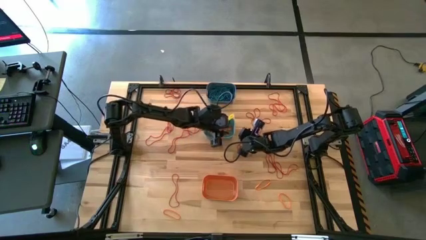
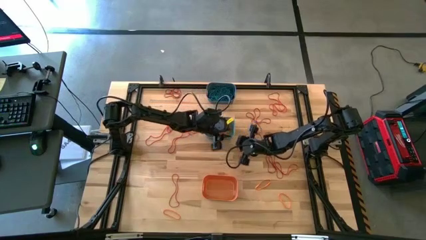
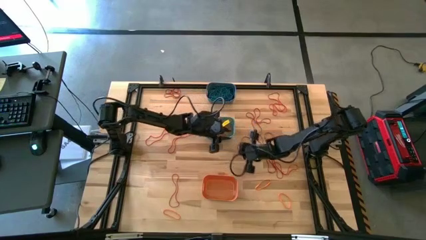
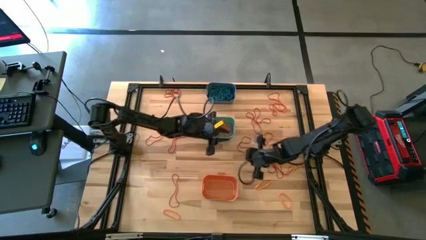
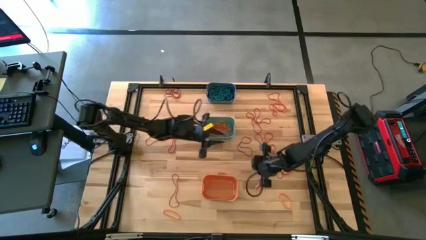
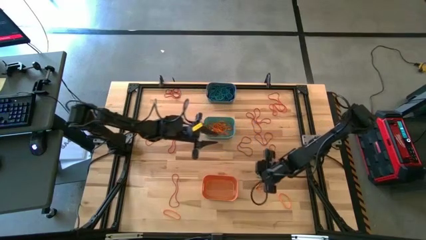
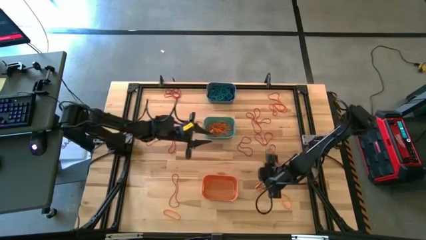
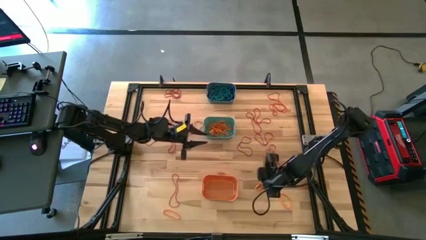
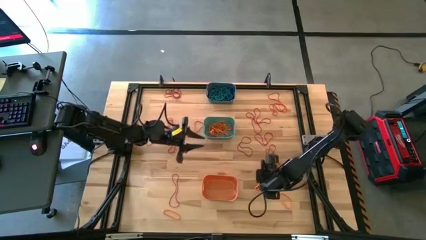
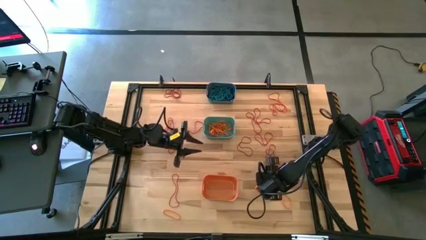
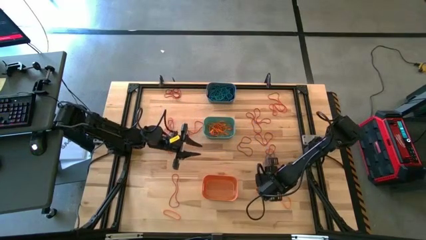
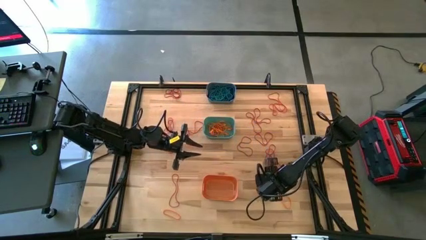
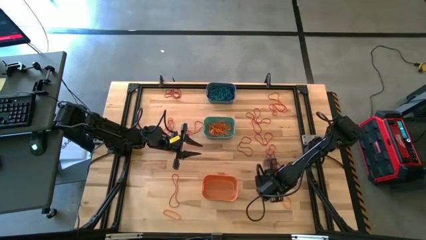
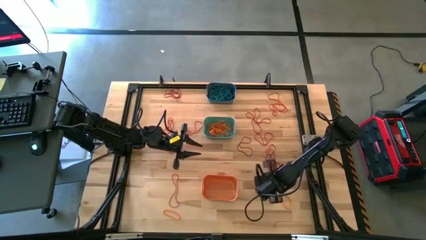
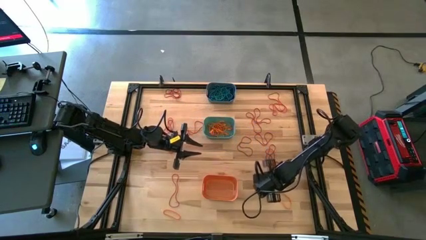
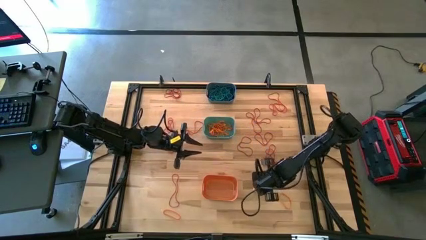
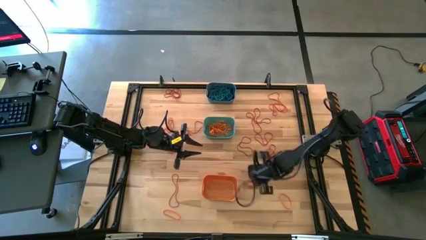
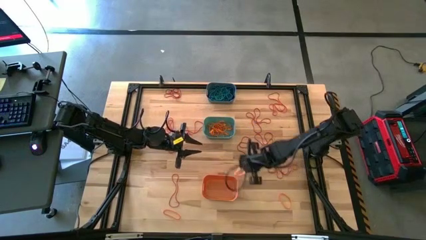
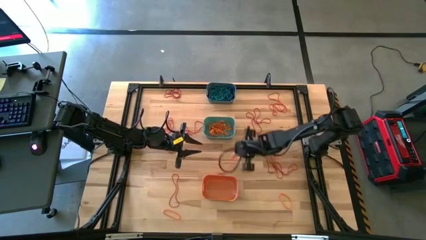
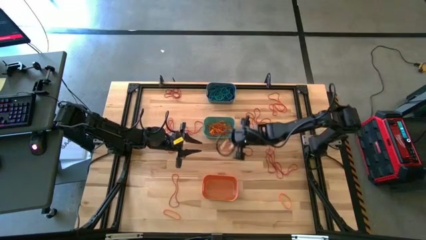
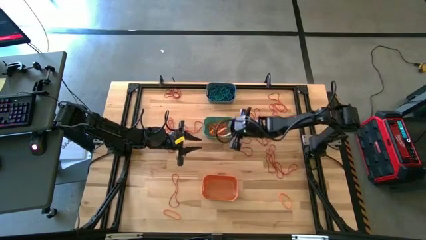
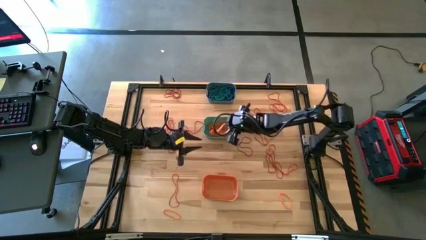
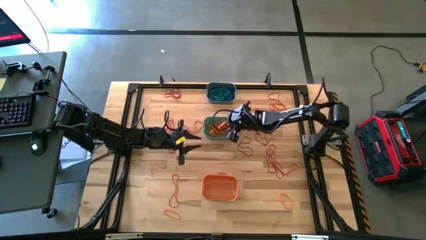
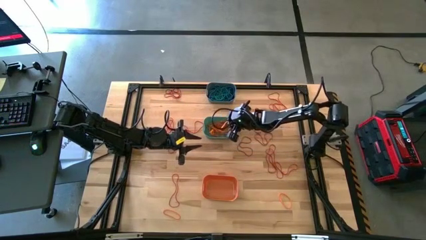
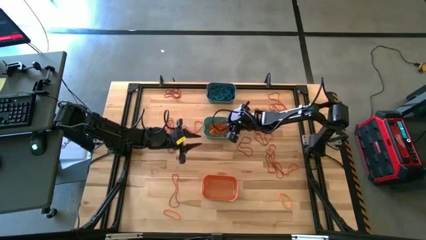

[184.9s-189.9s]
Task: Sort rubber bands into baskets
Put the orange rubber band into the green bin

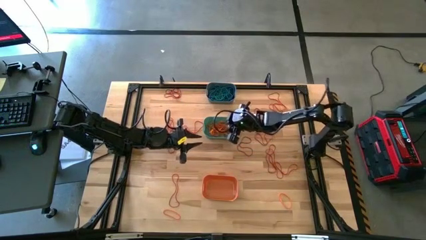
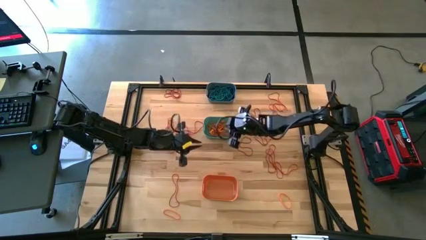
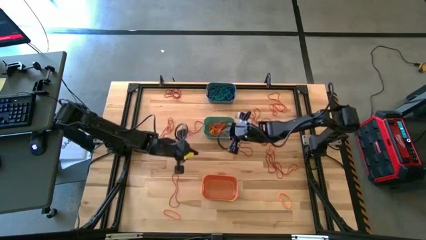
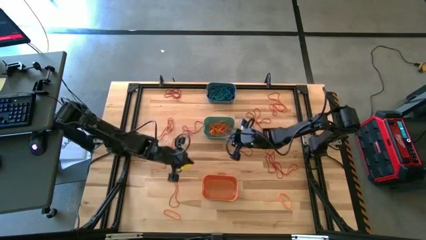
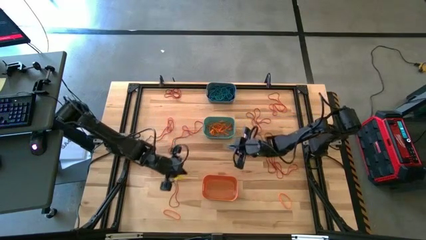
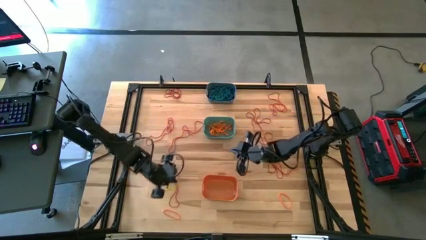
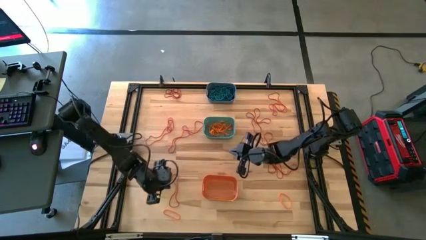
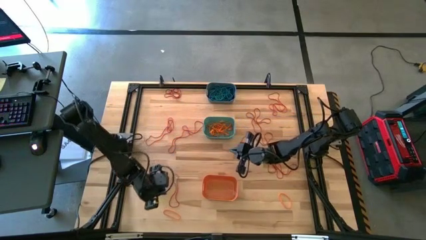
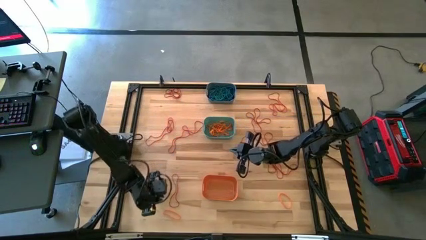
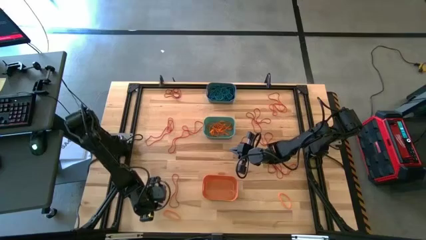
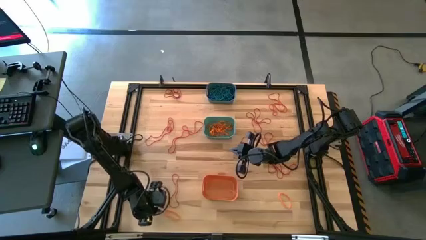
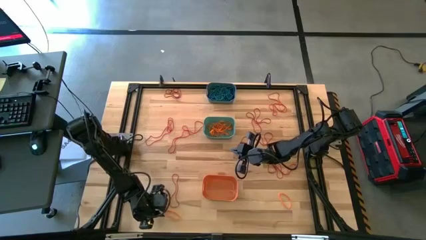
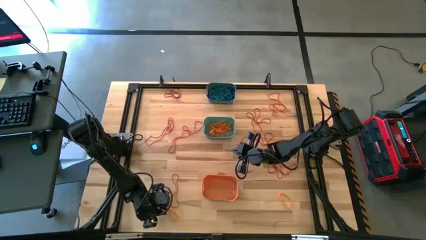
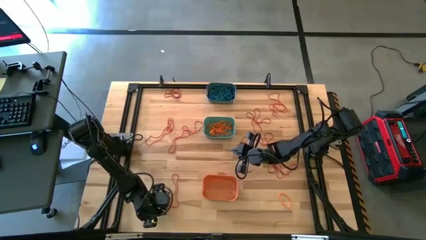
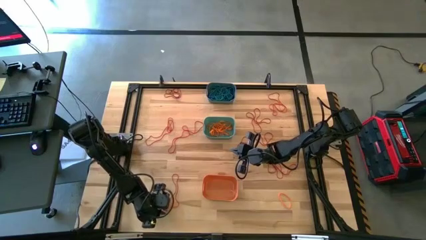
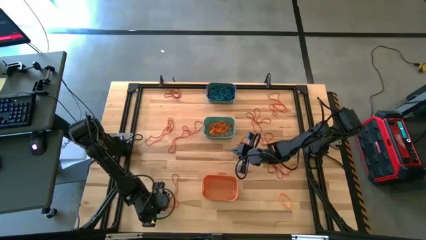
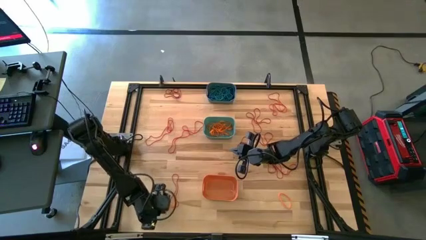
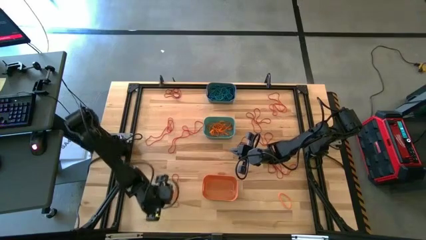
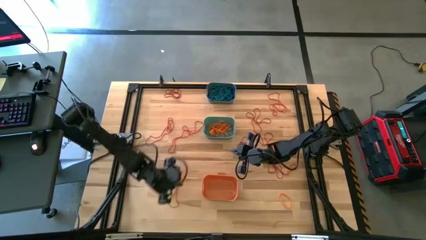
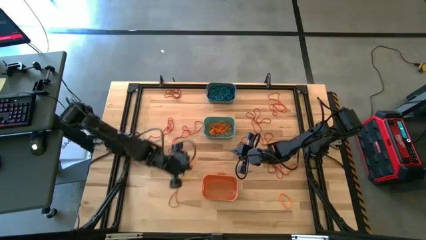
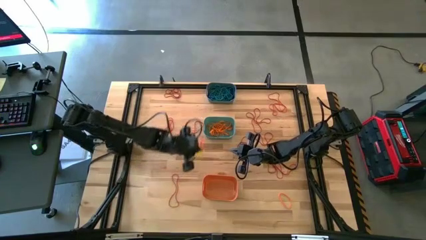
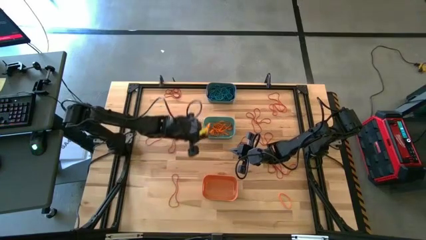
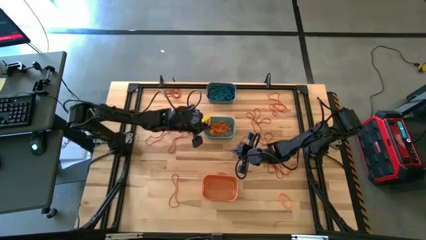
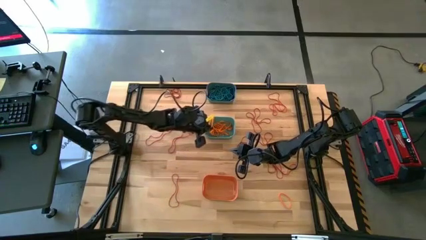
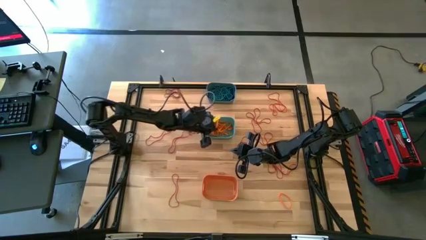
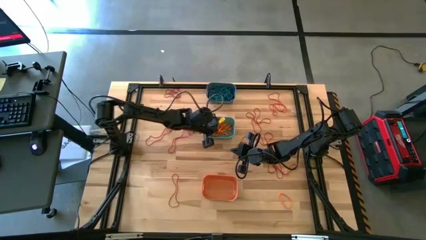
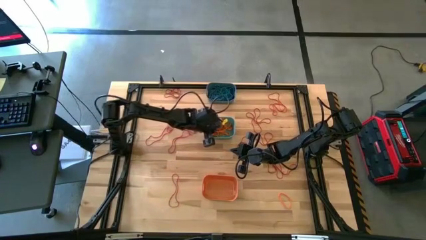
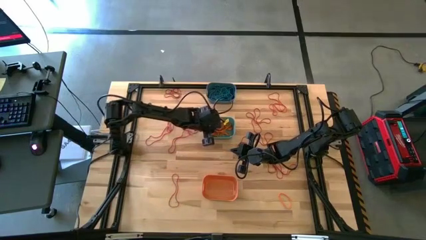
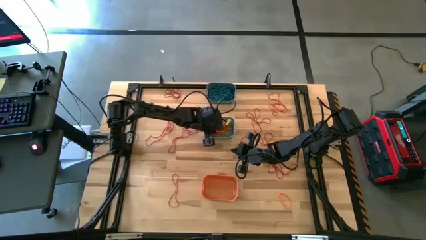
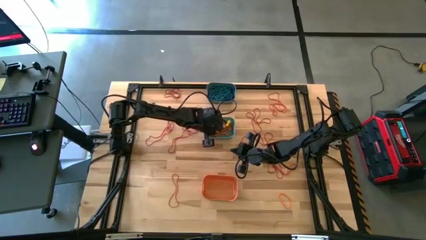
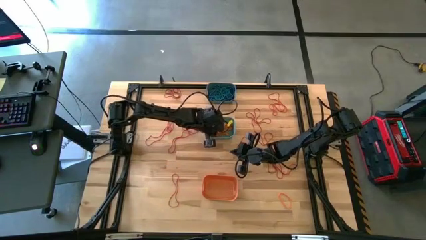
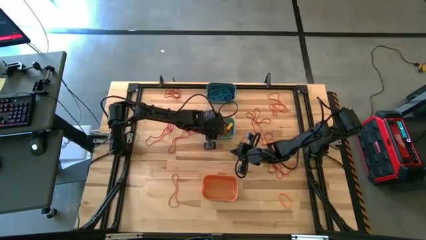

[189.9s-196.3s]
Put the orange rubber band into the green bin

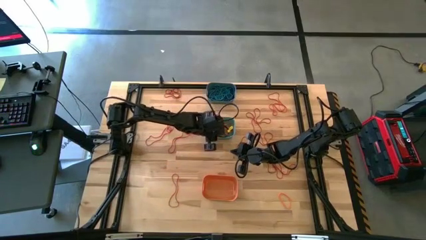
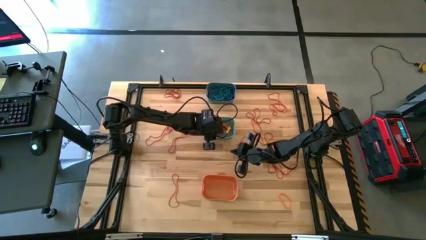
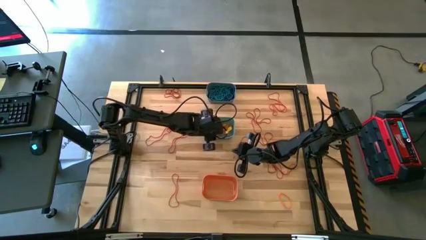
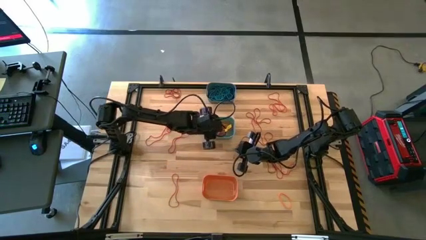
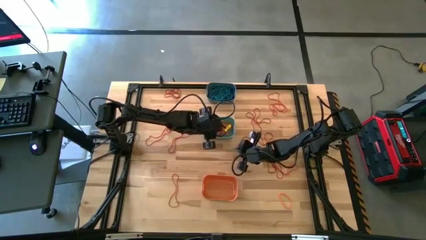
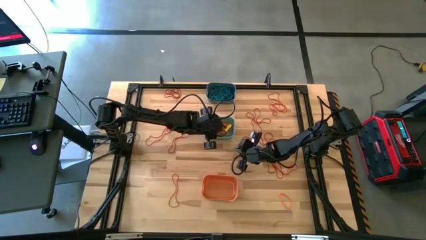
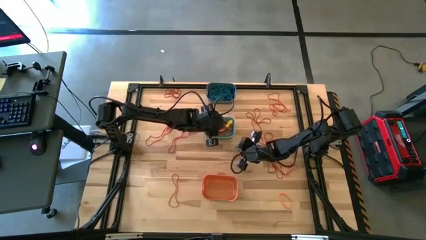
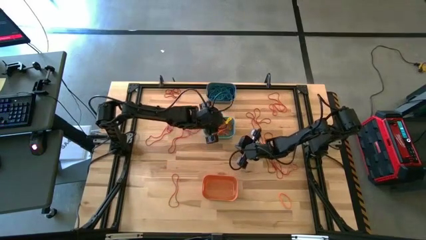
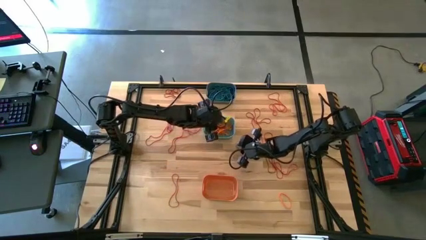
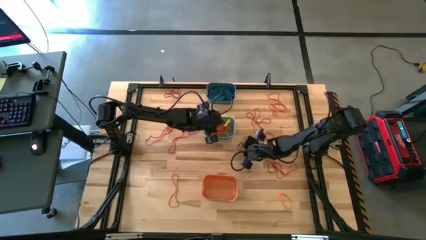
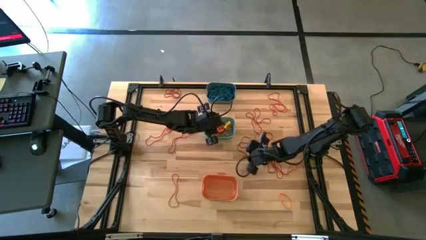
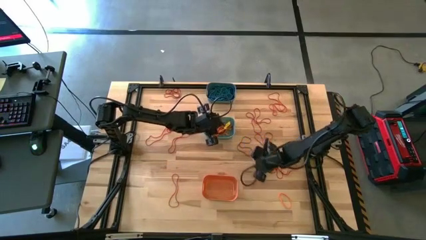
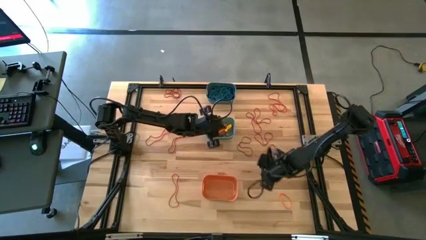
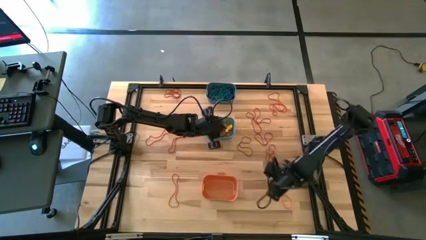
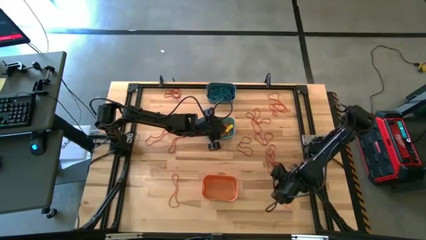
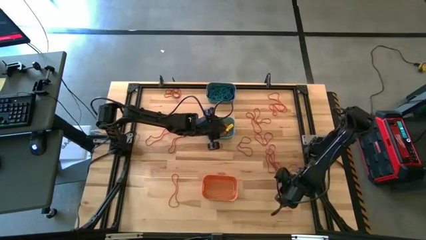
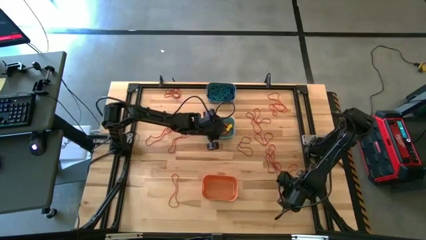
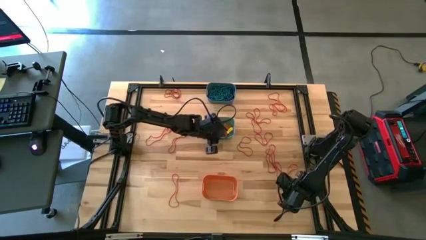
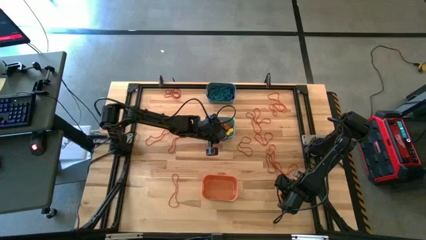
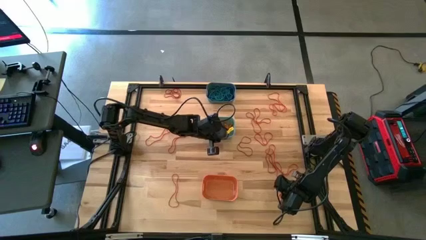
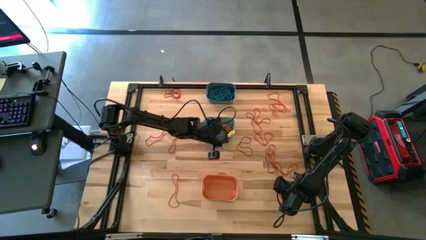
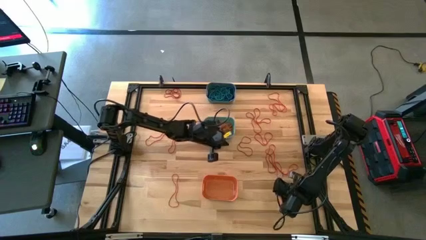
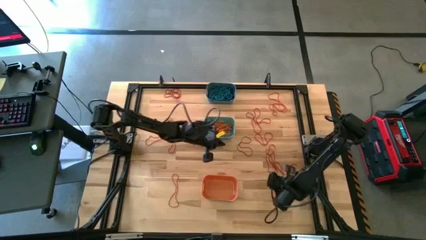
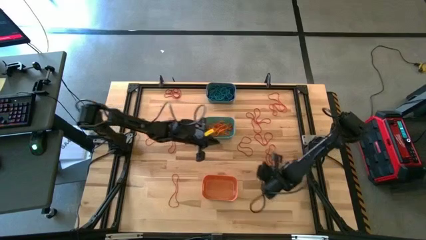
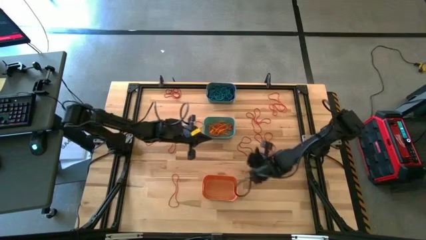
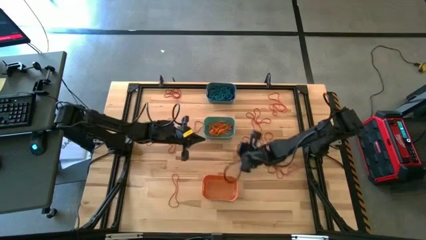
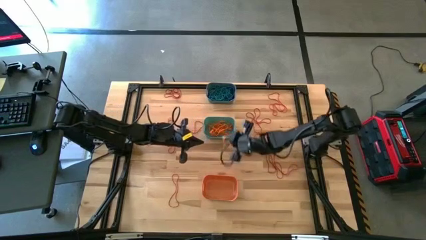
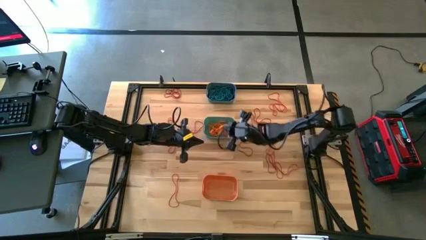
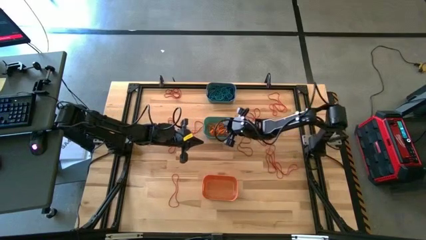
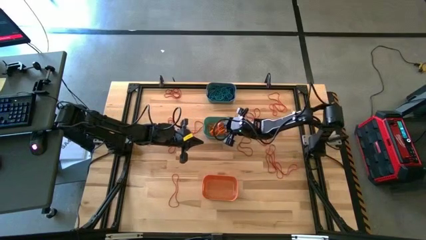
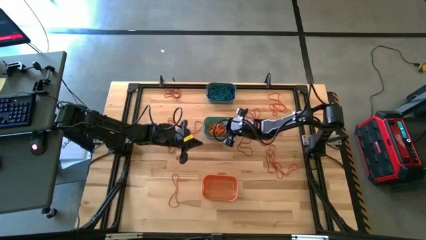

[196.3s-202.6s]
Put the orange rubber band into the green bin
